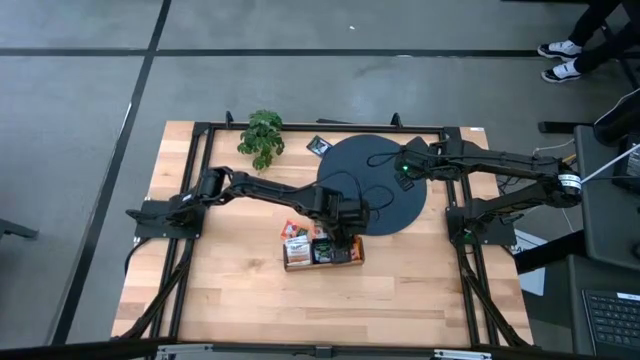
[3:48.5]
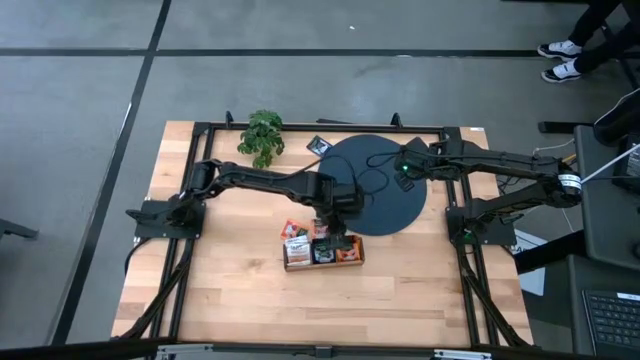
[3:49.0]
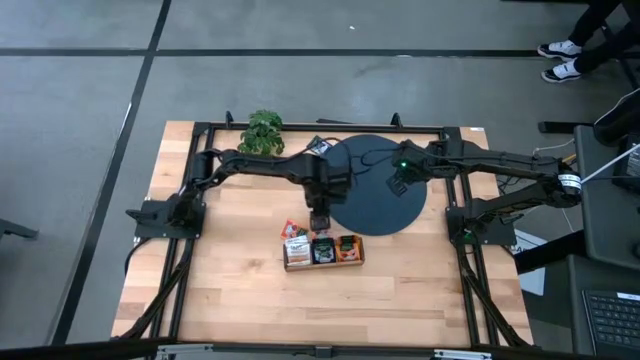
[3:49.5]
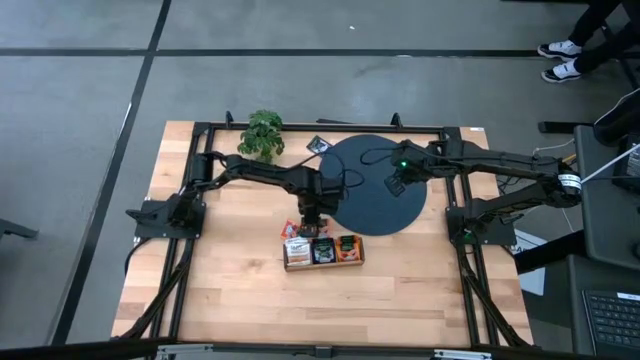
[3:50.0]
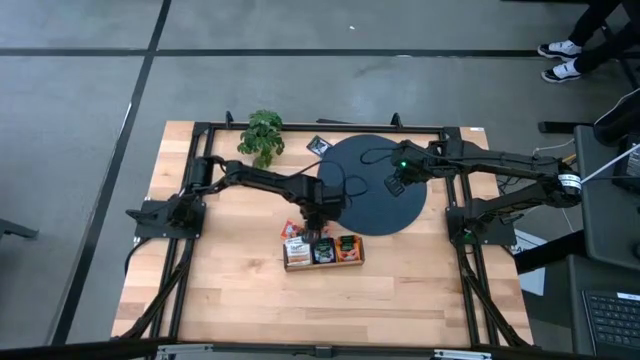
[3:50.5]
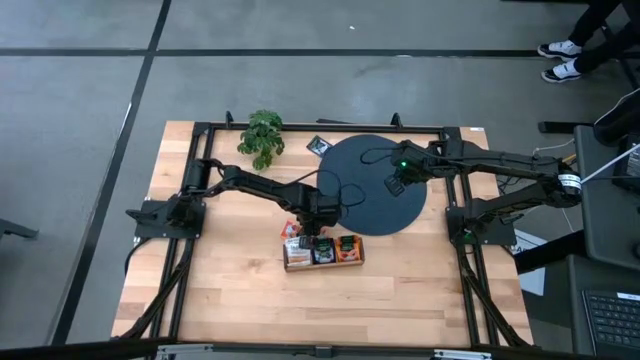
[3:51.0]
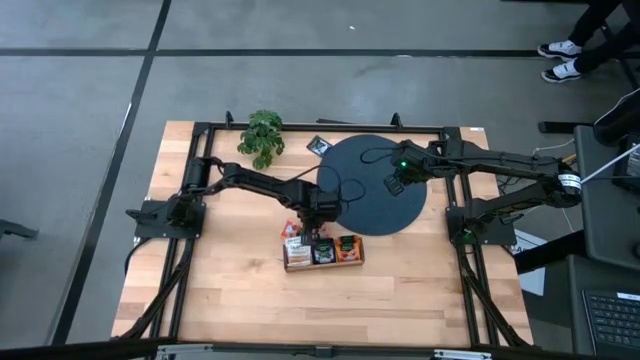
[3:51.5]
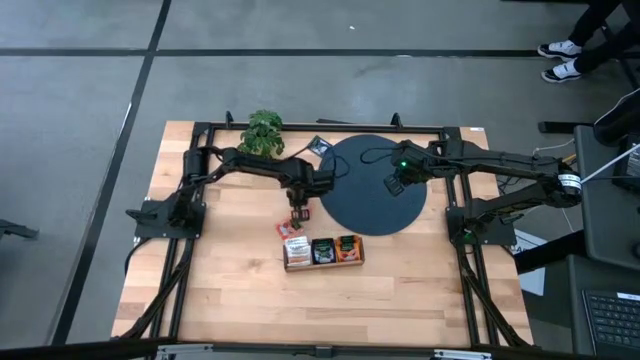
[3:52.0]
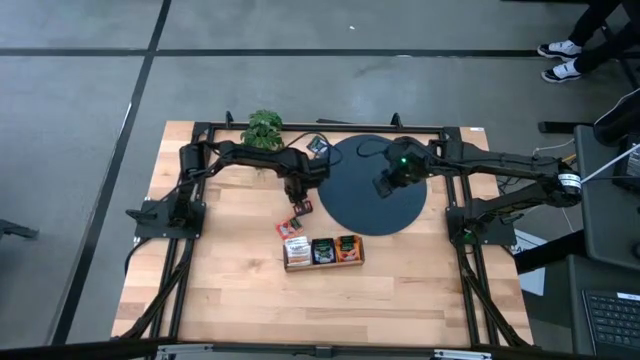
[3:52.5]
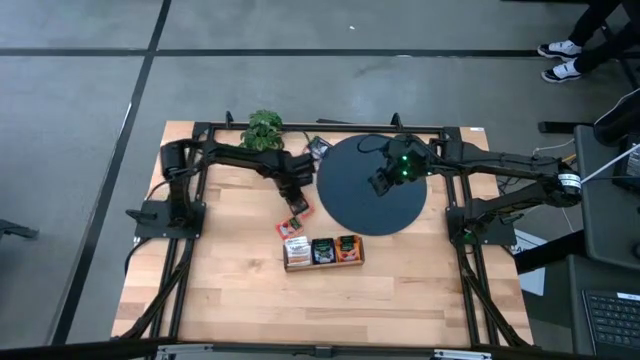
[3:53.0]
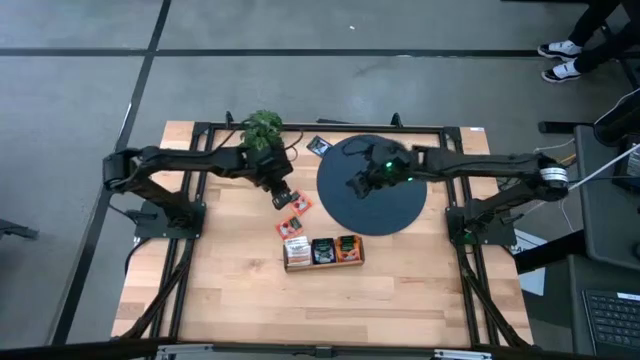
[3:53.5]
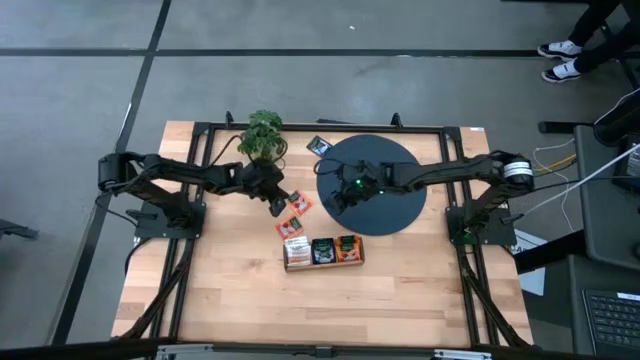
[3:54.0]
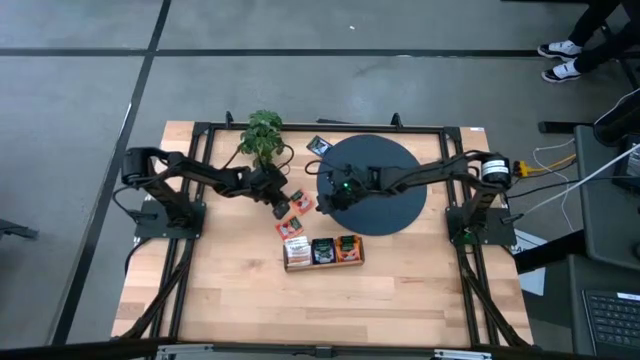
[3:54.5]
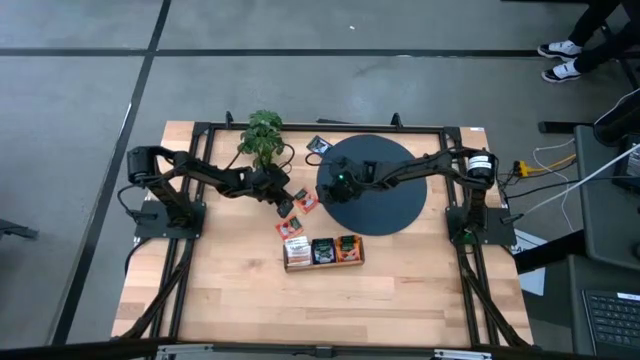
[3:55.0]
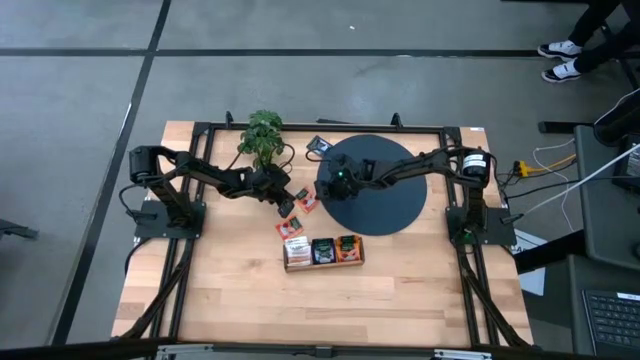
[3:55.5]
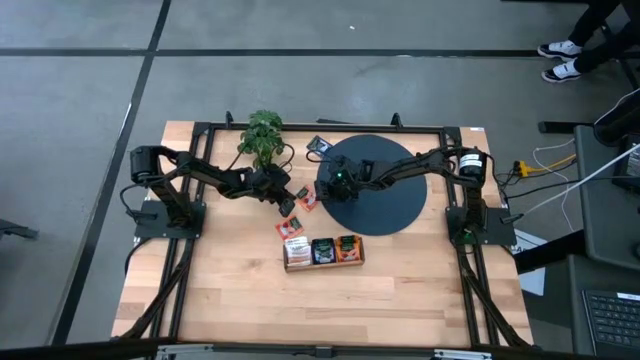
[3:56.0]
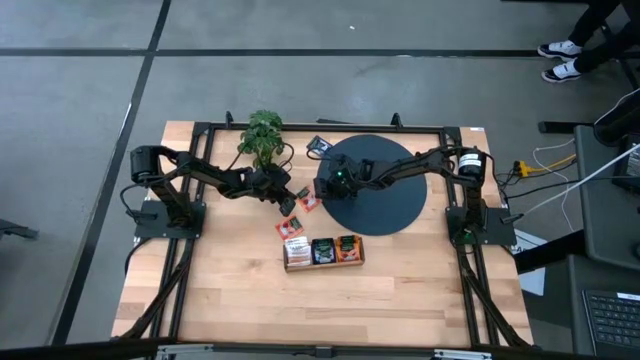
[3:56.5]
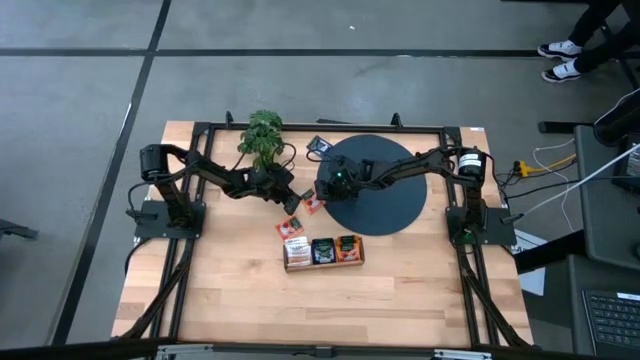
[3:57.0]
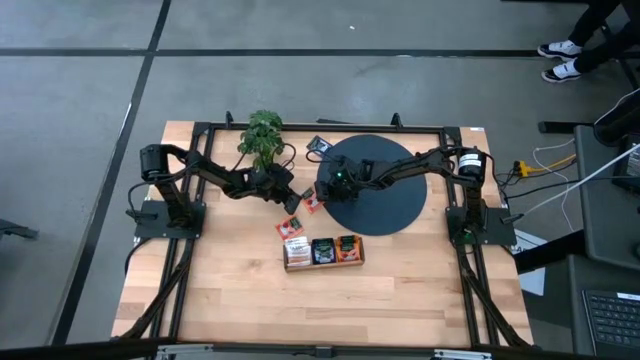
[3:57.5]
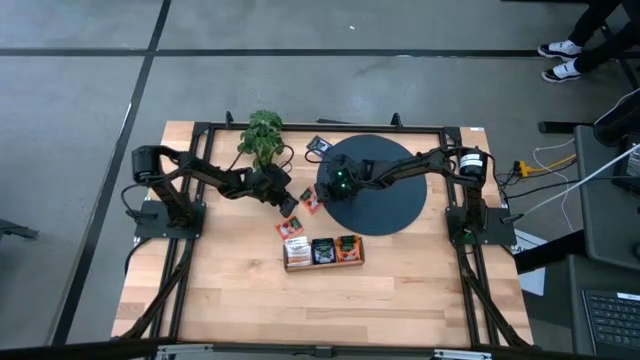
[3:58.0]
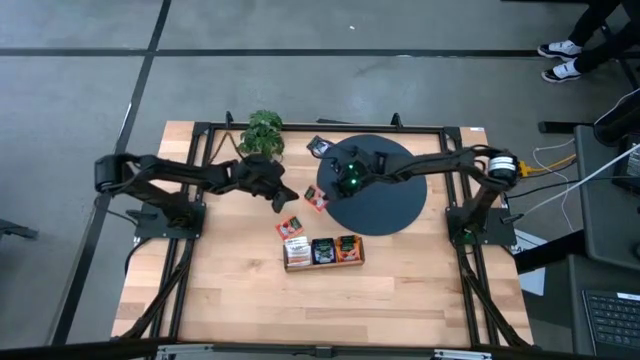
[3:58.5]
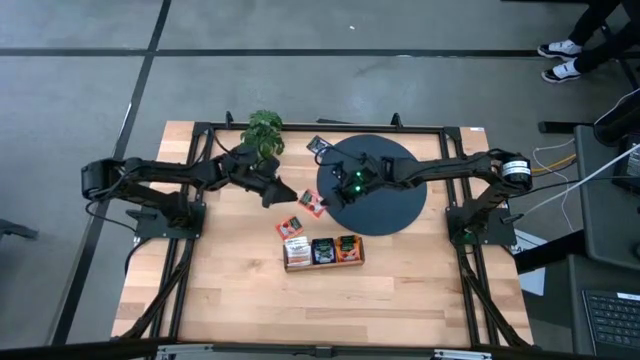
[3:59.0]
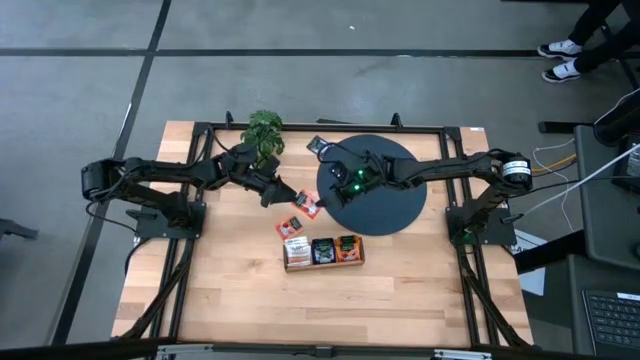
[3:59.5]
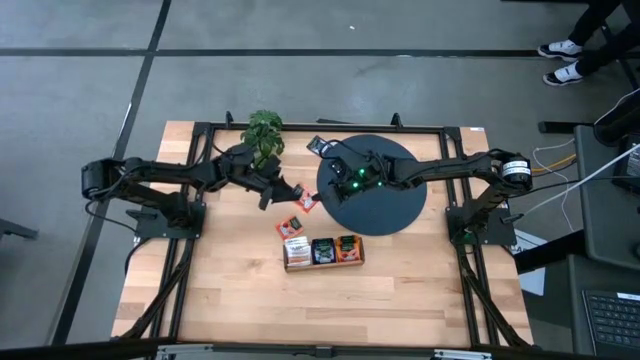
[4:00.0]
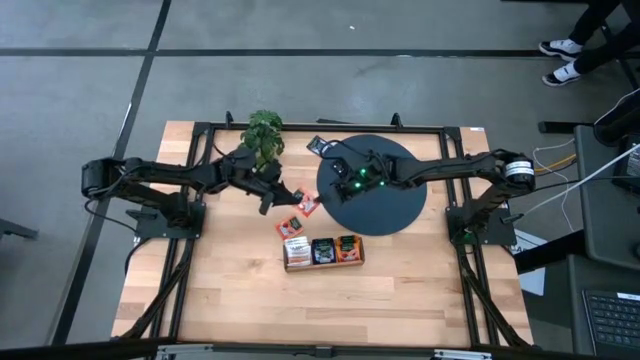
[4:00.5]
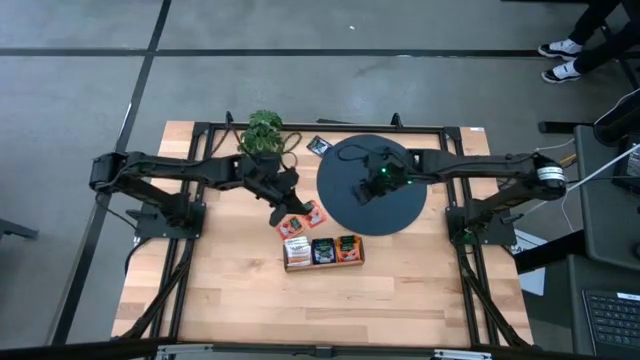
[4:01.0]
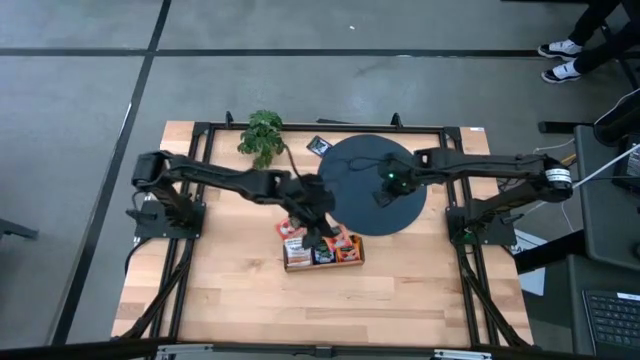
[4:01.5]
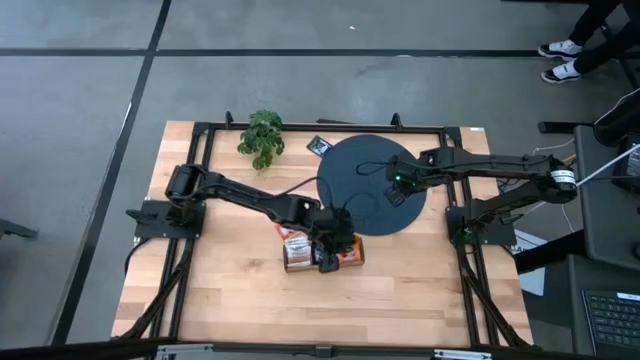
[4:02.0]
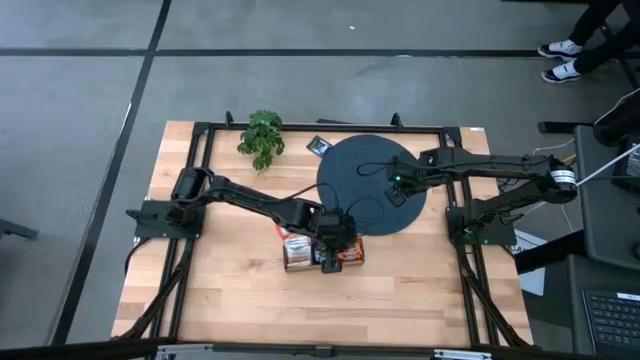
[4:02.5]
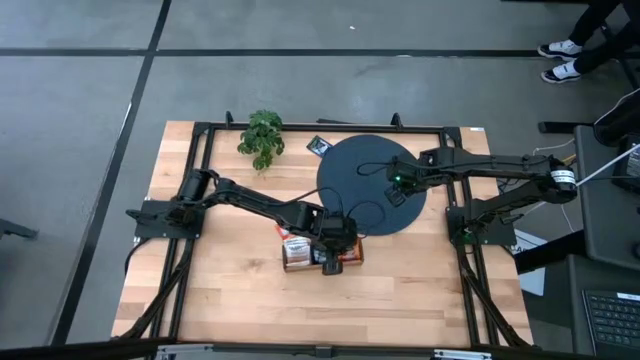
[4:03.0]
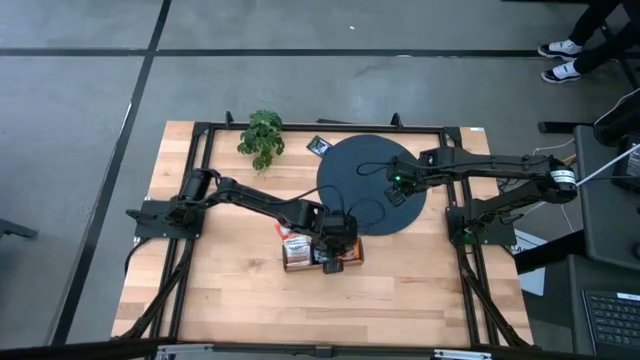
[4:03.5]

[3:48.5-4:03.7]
Task: Pick & Place Tea
Put the right orange tea bag into the right section of the wooden organizer

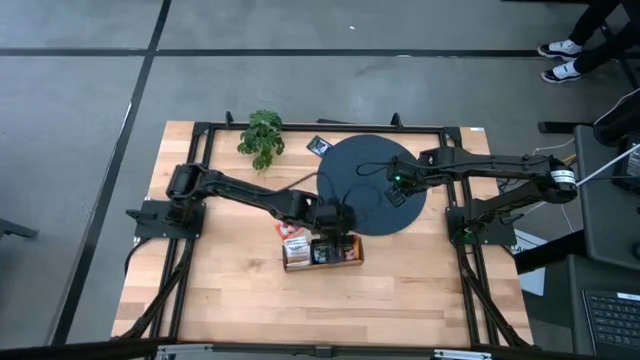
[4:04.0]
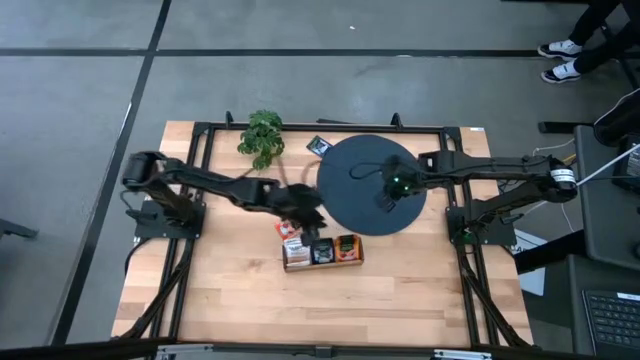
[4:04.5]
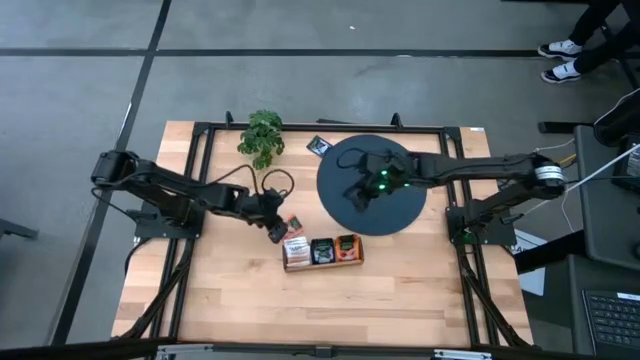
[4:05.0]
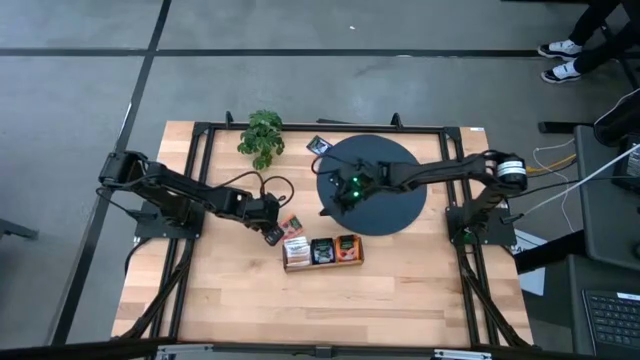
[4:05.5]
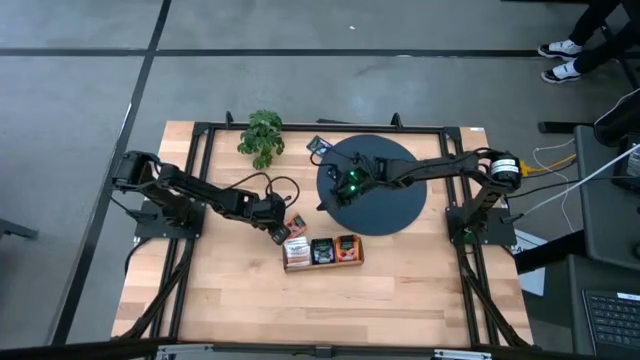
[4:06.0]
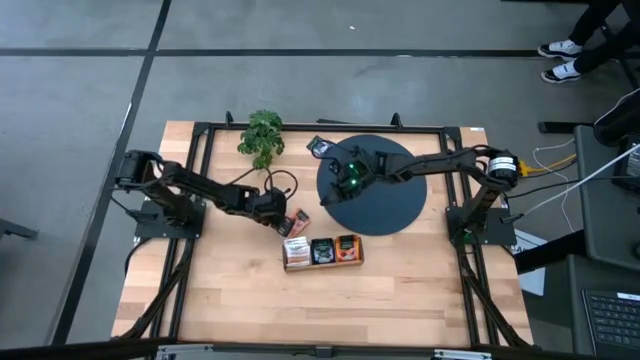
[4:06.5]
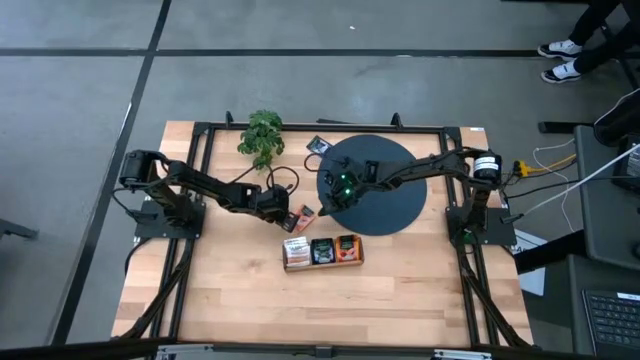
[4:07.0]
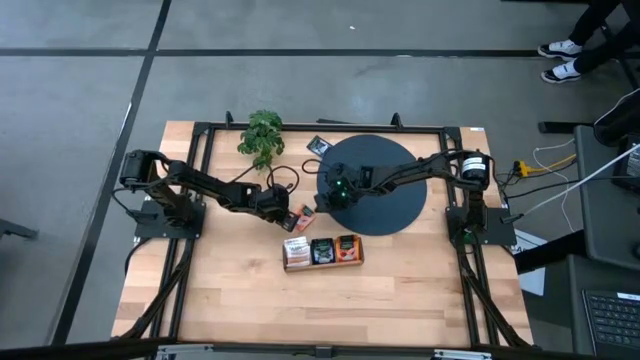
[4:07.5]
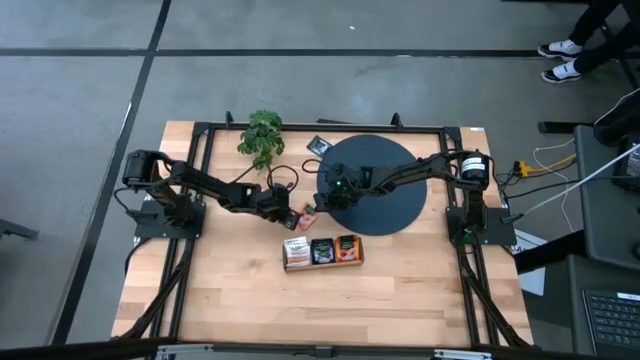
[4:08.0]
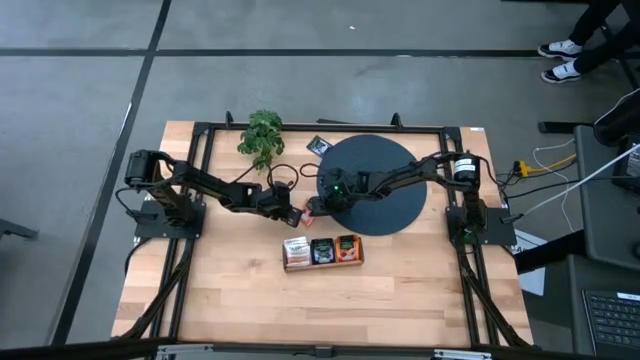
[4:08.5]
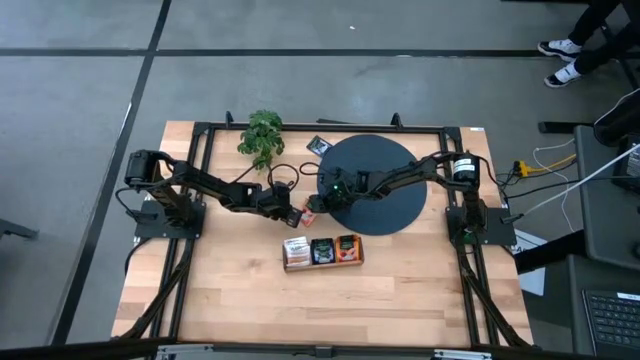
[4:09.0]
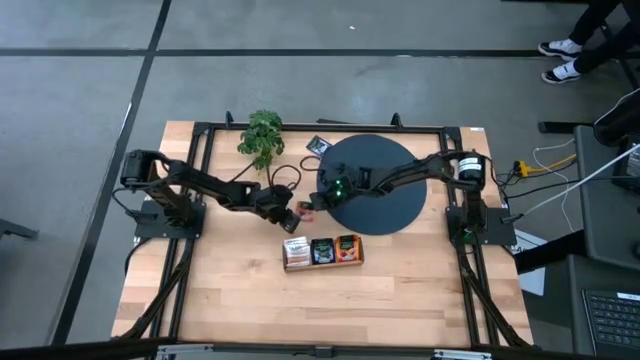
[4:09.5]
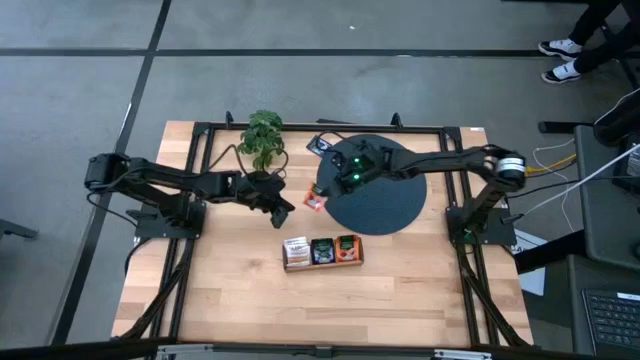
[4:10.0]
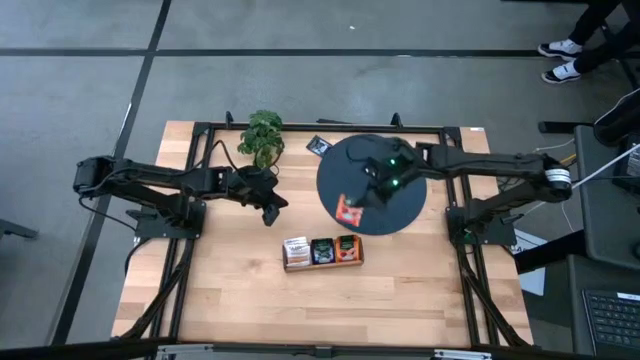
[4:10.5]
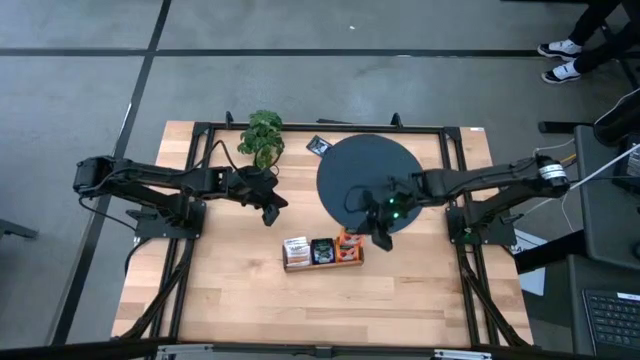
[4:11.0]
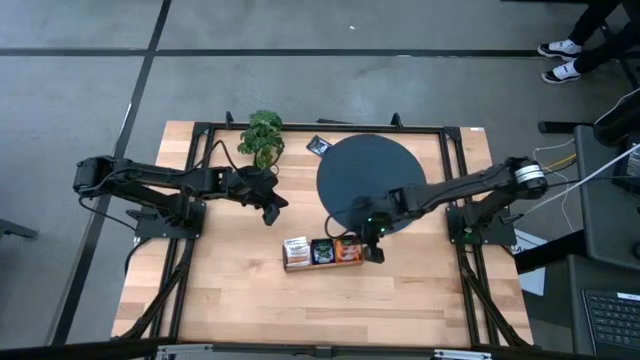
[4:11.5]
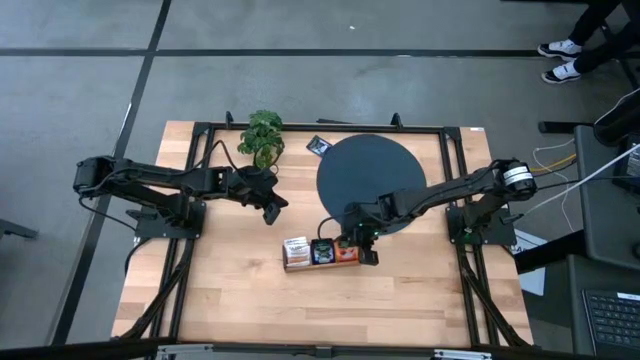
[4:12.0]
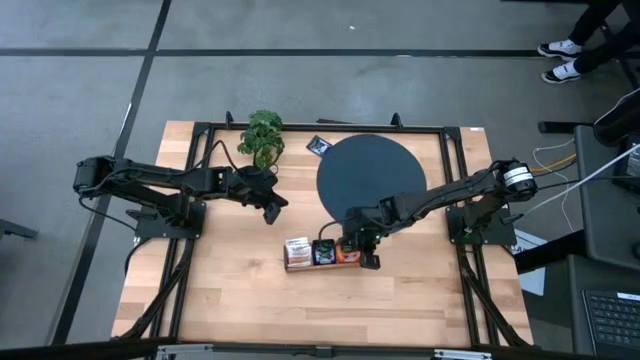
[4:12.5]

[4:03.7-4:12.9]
Put the orange tea bag into the right section of the wooden organizer
